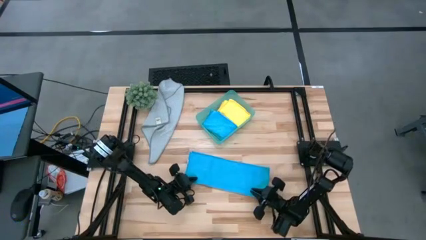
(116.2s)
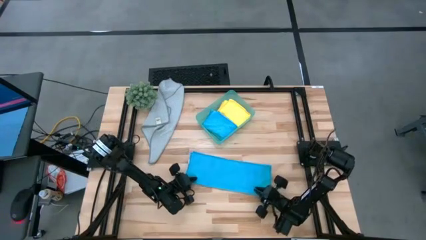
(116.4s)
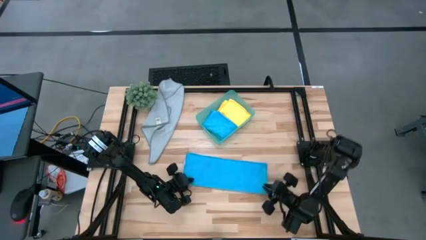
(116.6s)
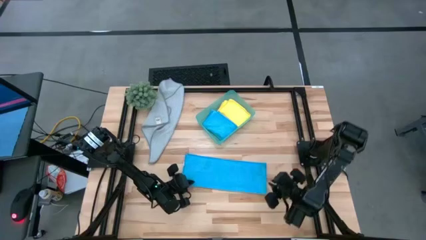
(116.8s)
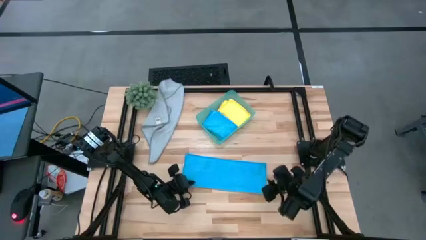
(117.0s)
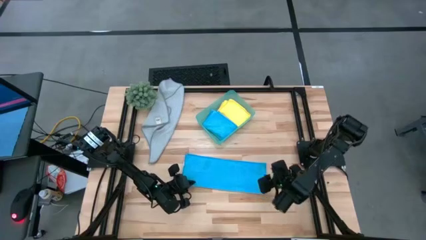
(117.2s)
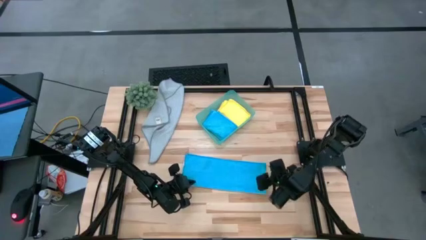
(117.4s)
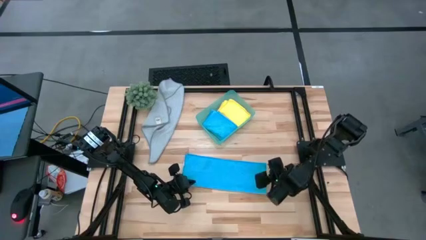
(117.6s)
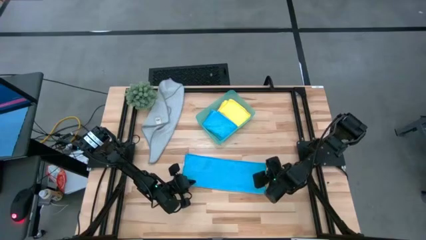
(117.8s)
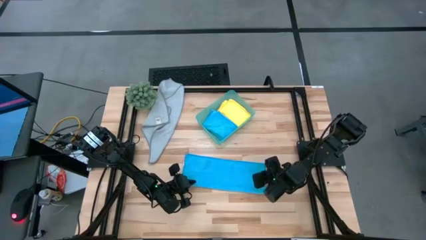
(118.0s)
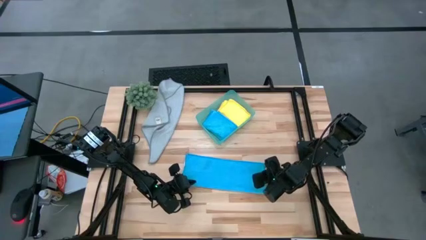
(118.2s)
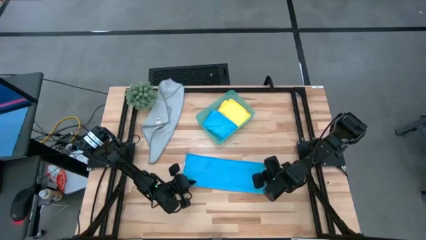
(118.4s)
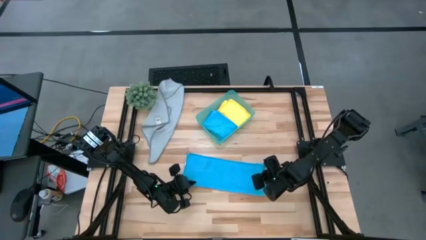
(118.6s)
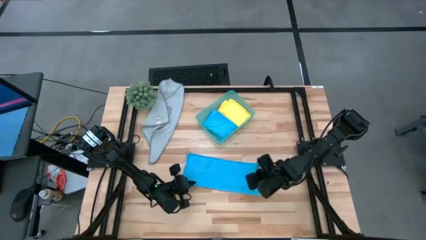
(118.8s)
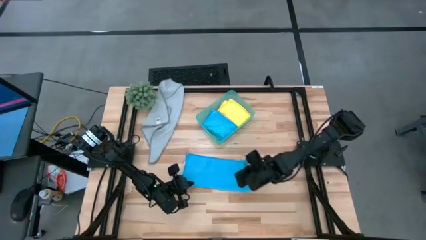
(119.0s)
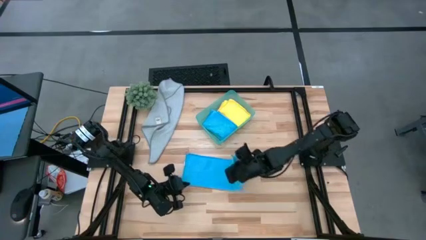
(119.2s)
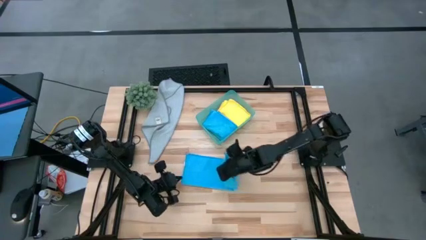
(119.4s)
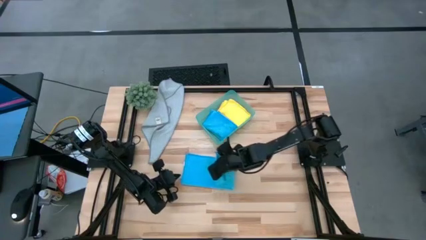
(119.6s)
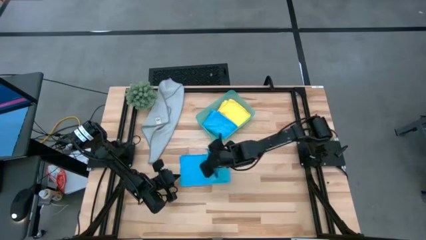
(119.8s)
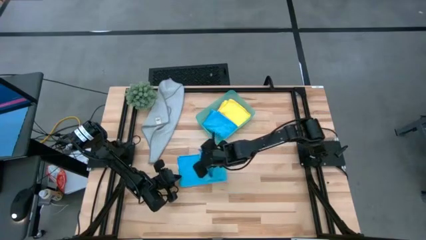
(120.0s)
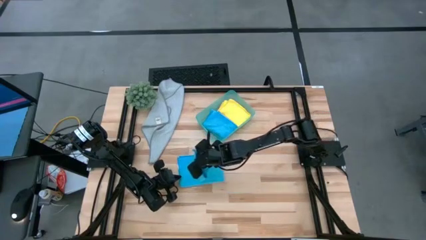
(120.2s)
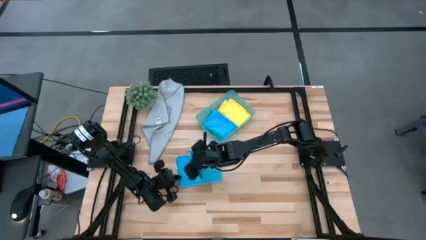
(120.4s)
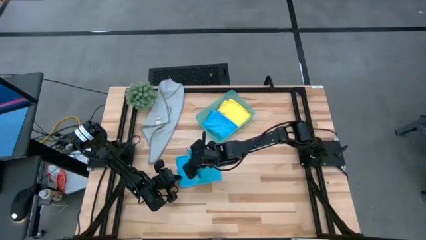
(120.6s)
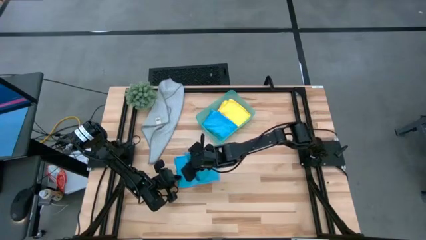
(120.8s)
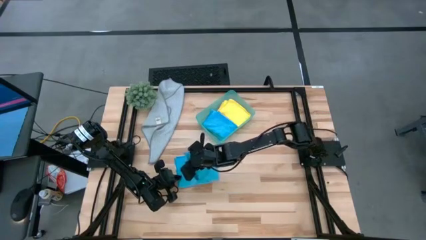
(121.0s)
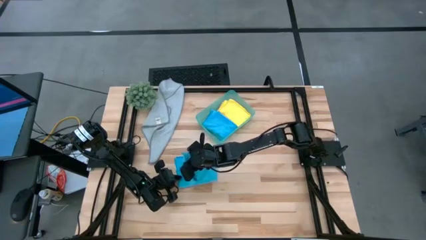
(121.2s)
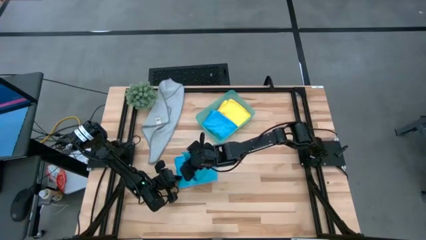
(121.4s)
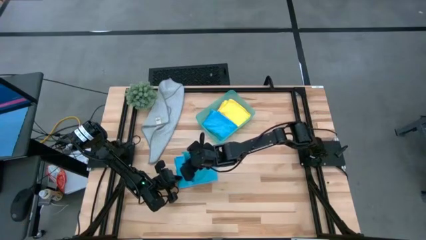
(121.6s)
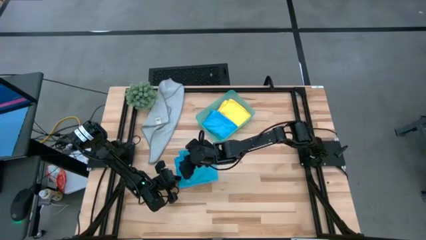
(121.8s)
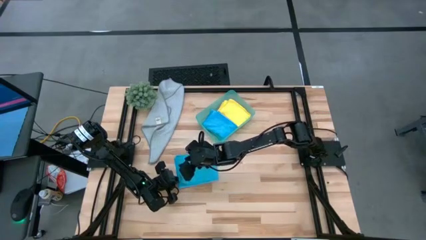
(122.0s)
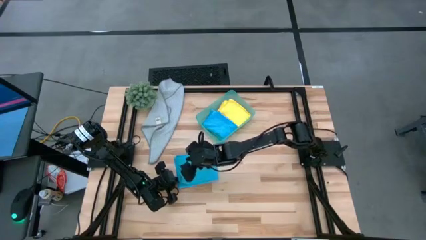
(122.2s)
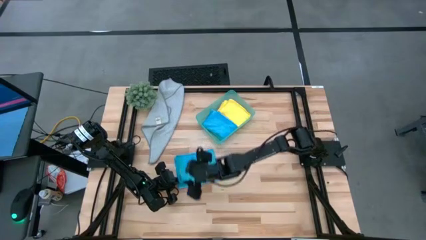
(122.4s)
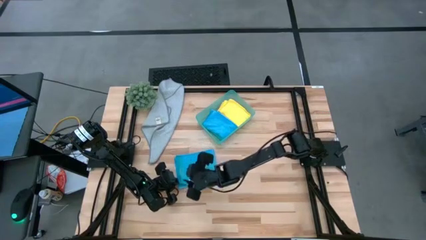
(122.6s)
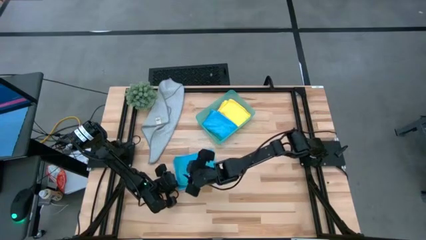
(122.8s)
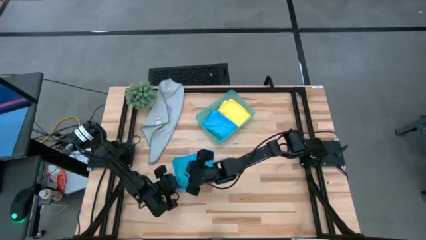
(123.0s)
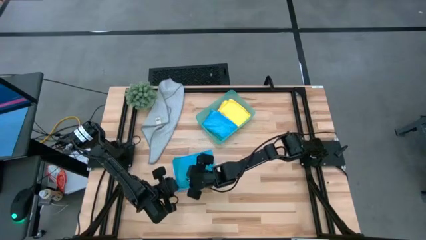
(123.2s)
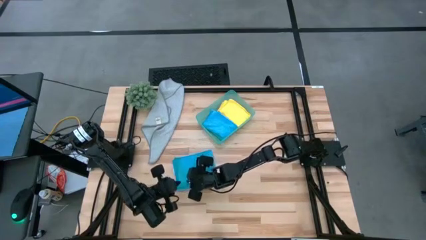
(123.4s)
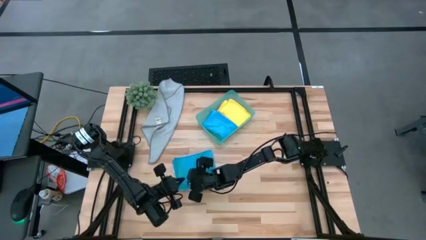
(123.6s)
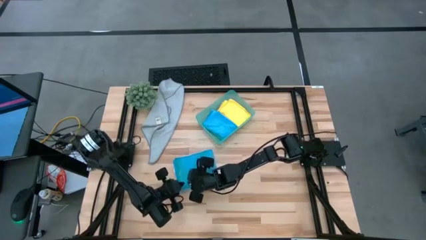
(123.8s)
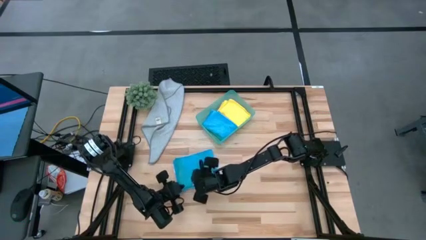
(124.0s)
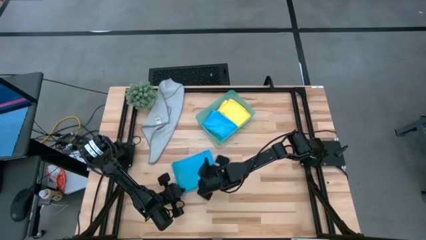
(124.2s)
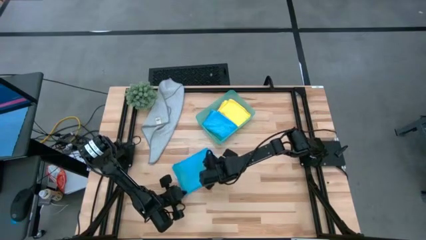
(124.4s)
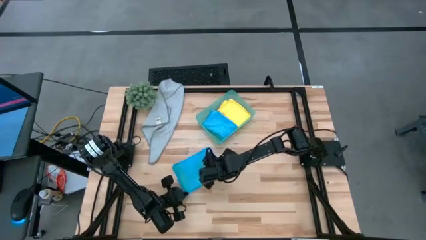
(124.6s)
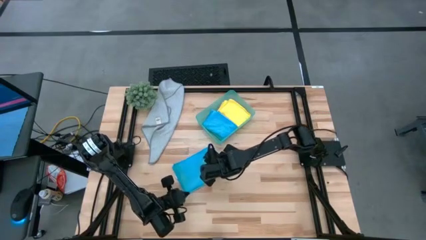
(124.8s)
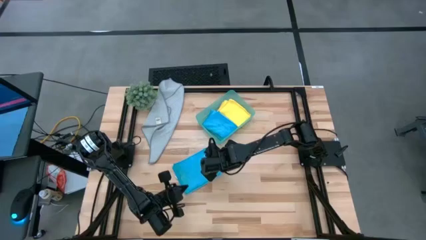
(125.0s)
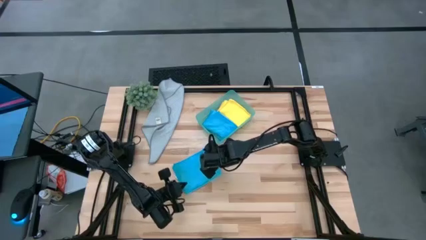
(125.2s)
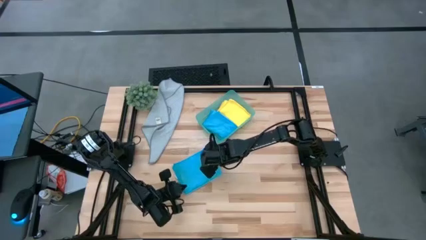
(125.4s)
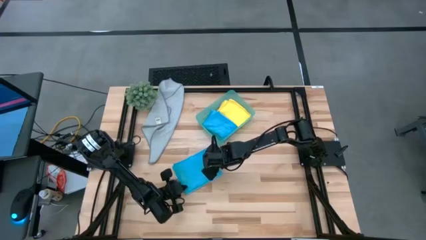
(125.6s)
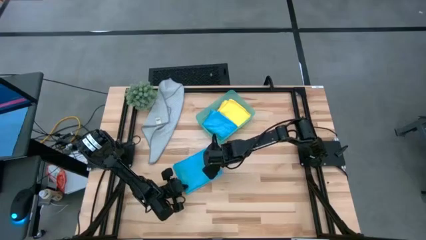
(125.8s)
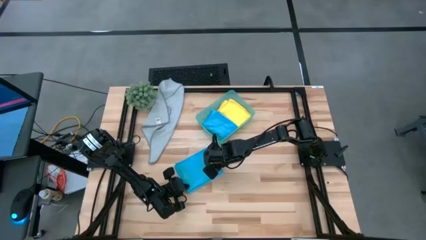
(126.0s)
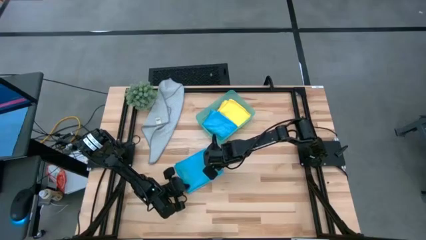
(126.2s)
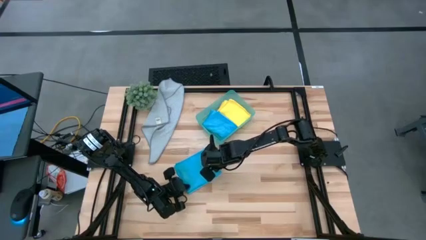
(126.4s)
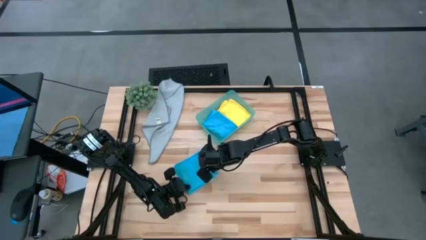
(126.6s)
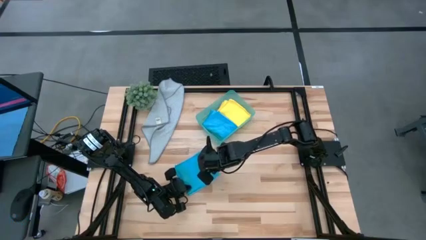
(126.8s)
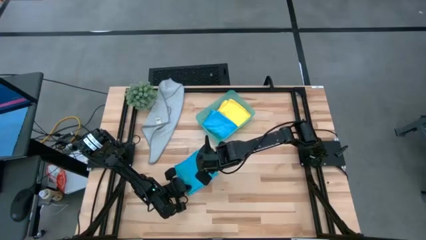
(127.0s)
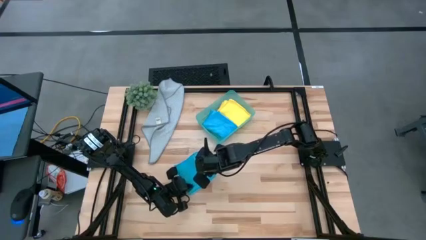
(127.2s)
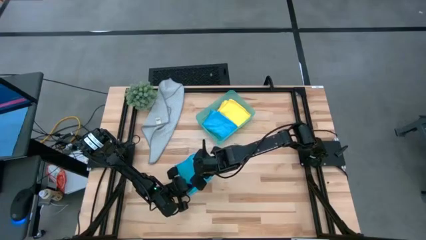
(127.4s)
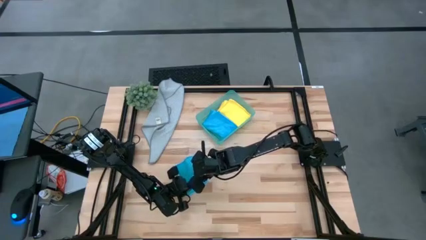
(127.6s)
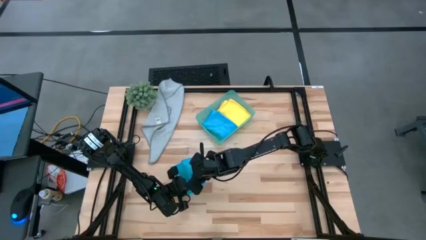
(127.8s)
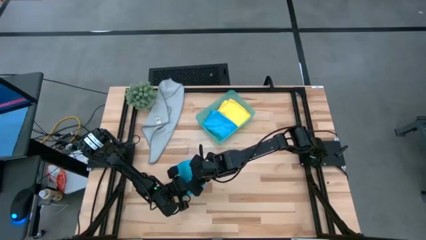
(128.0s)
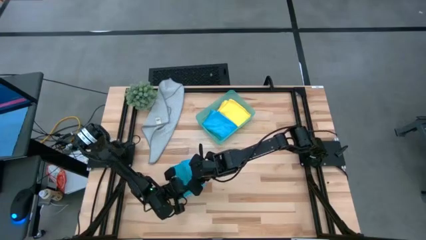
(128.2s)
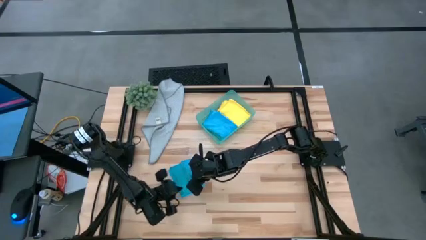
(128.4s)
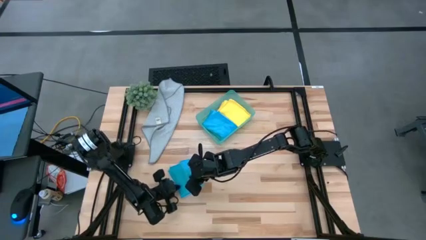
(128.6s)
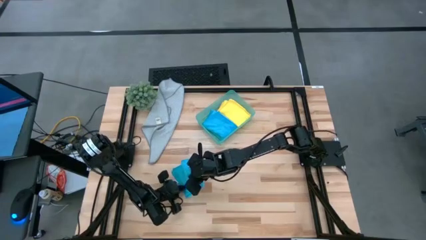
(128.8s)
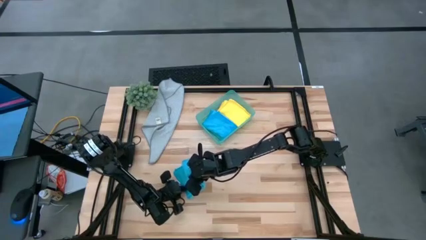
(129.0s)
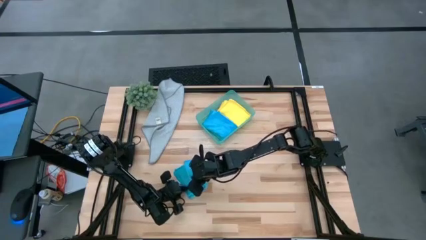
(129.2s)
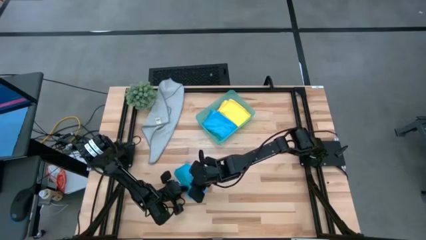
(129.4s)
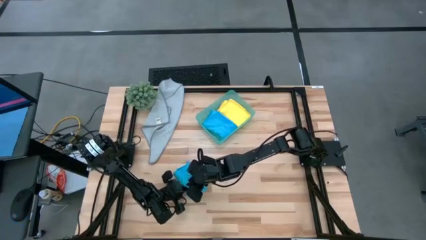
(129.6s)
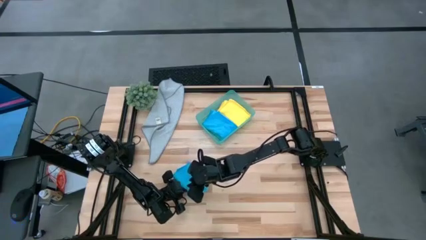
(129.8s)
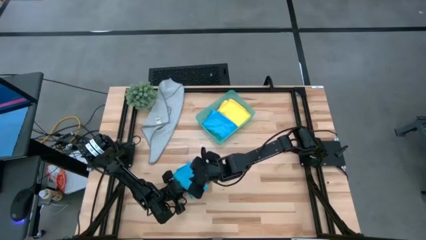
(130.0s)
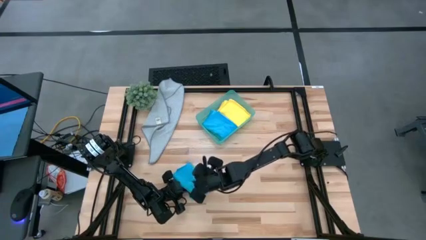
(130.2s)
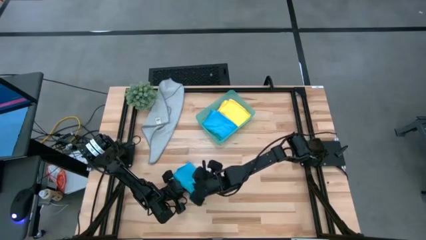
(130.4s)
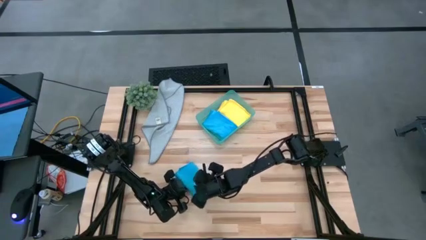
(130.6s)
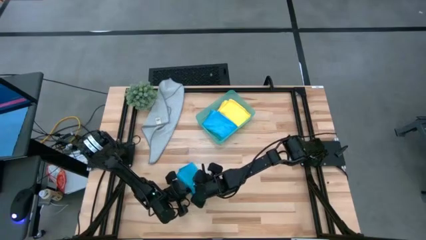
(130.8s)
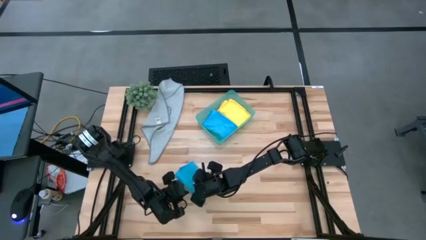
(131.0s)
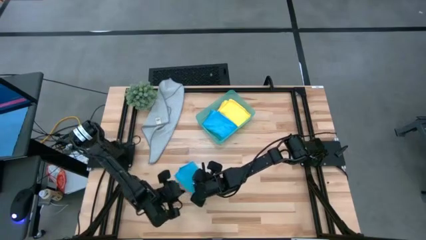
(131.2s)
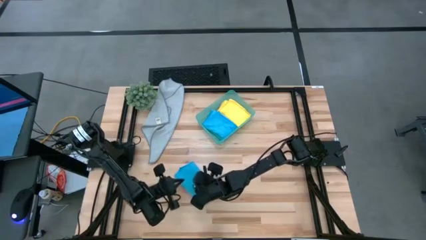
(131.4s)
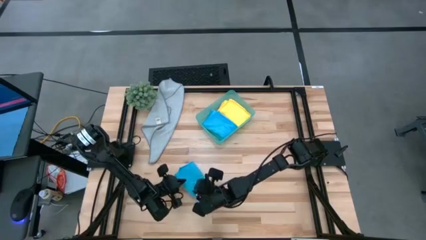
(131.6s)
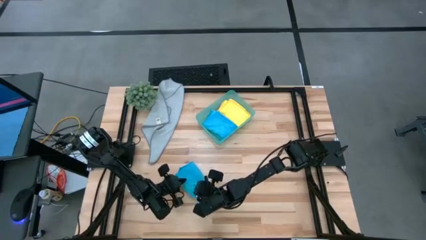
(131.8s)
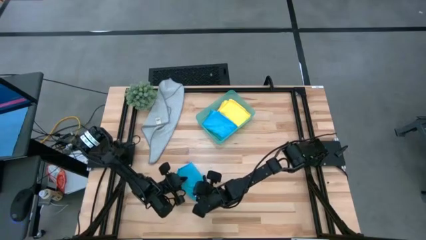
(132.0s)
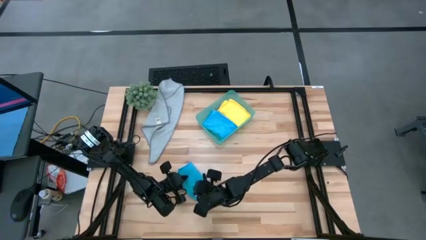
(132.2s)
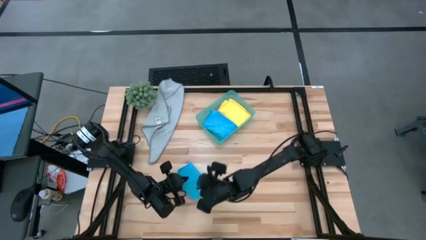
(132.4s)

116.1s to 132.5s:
Task: Fold microfiber towels
Fold the blue microfiber towel
